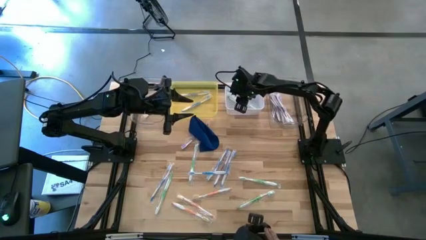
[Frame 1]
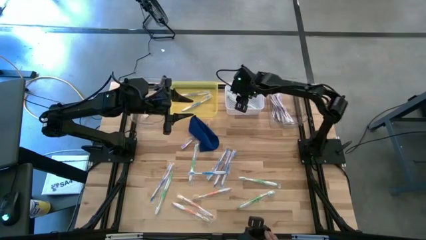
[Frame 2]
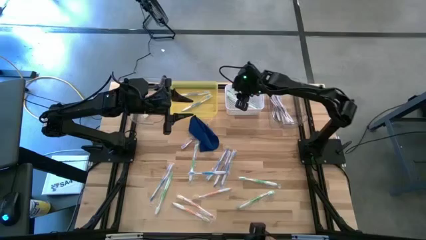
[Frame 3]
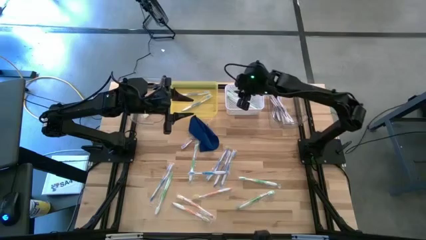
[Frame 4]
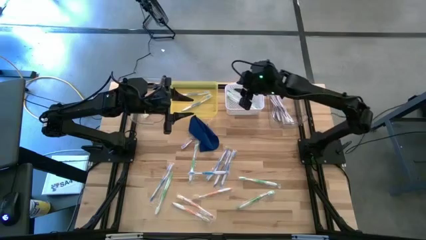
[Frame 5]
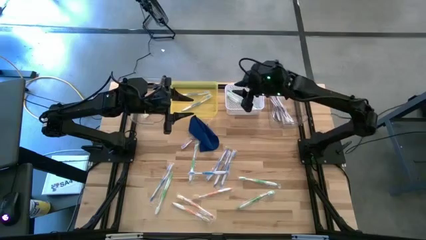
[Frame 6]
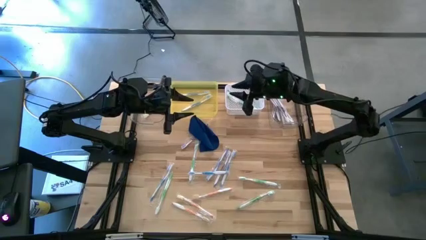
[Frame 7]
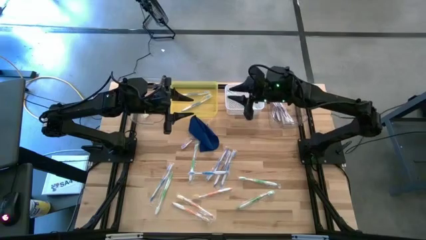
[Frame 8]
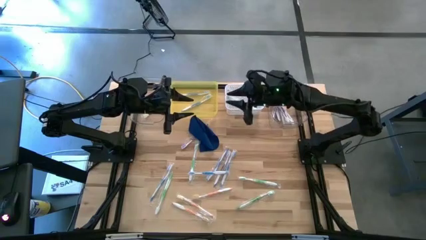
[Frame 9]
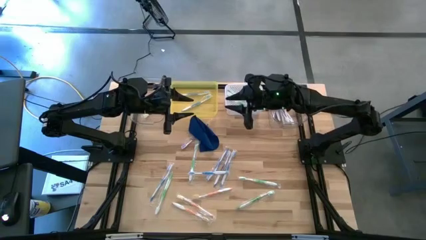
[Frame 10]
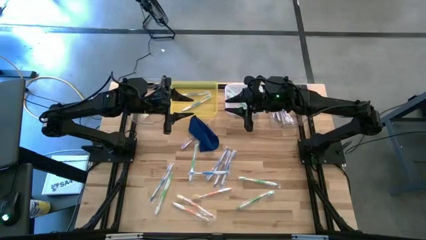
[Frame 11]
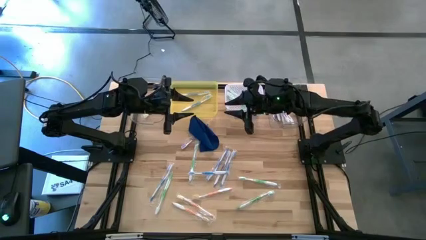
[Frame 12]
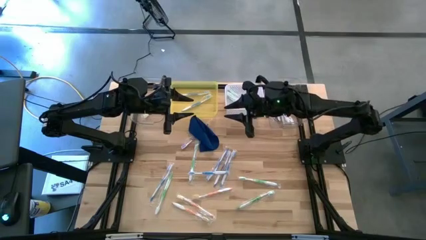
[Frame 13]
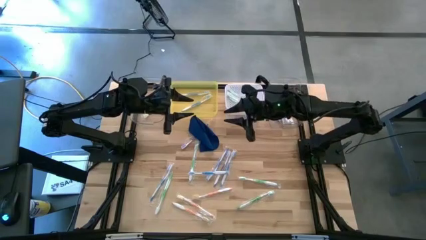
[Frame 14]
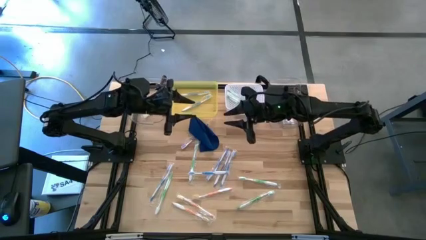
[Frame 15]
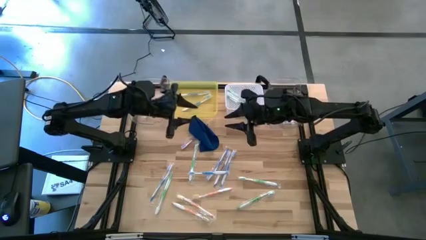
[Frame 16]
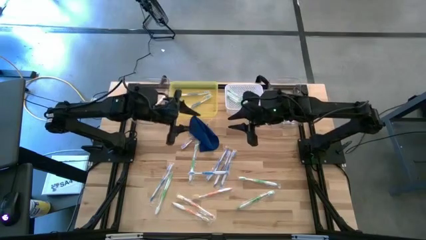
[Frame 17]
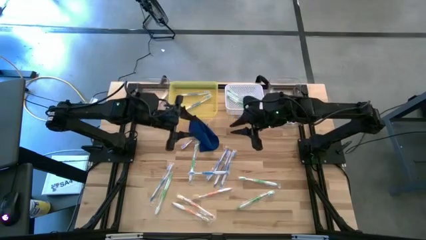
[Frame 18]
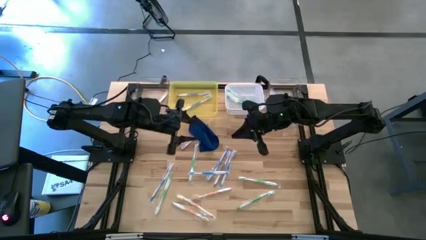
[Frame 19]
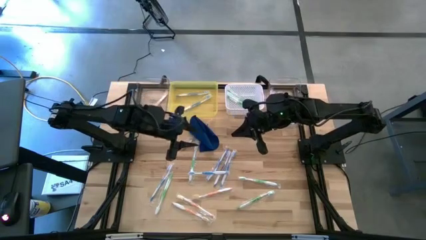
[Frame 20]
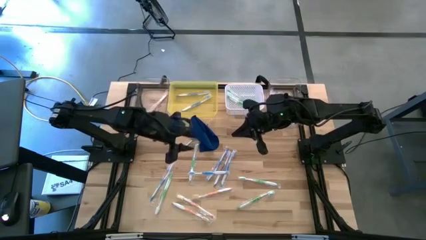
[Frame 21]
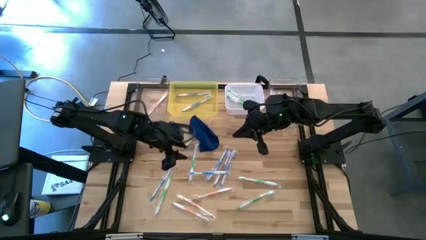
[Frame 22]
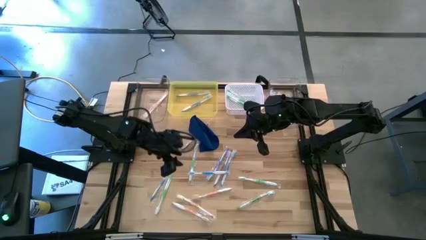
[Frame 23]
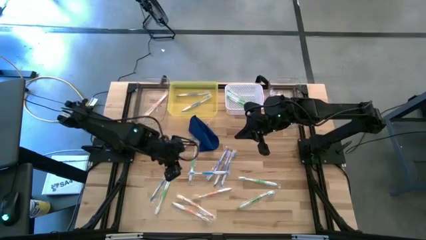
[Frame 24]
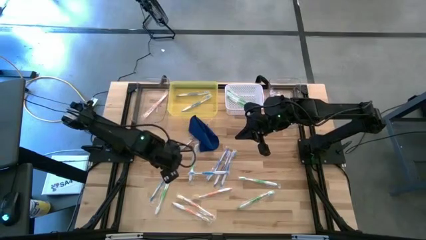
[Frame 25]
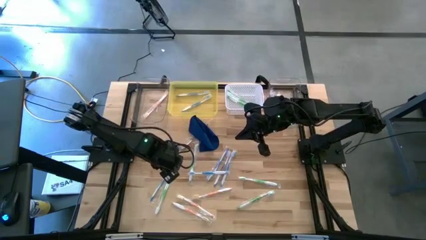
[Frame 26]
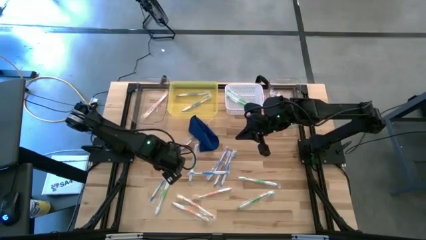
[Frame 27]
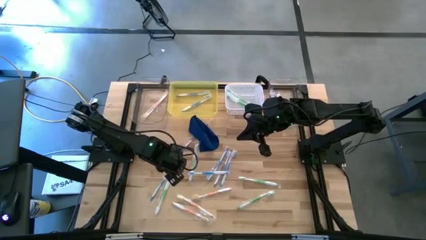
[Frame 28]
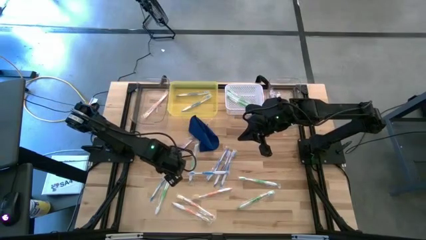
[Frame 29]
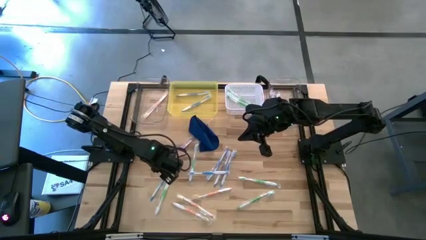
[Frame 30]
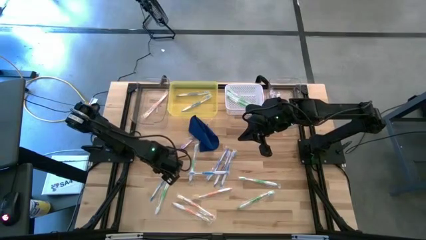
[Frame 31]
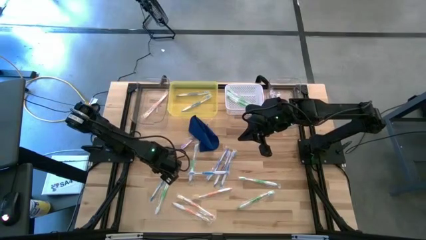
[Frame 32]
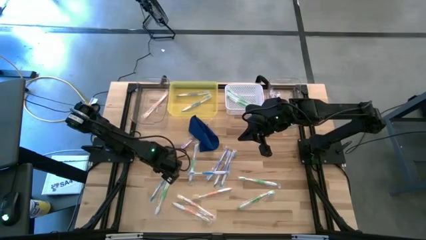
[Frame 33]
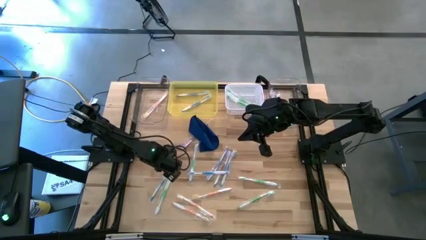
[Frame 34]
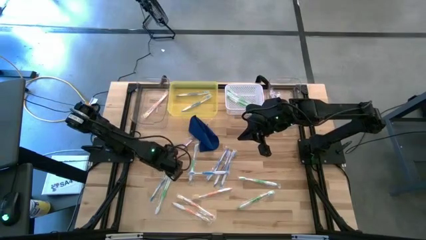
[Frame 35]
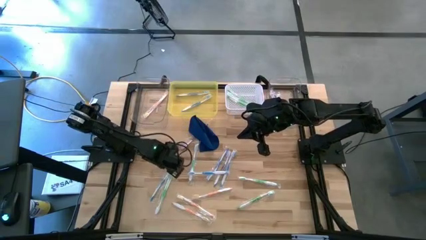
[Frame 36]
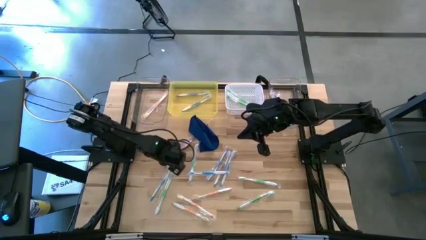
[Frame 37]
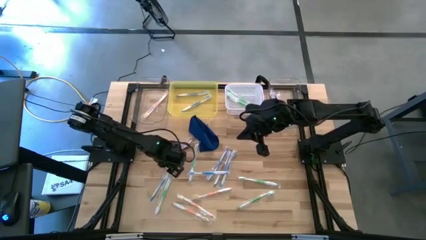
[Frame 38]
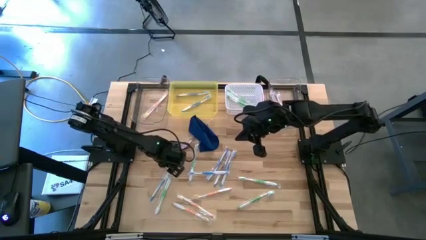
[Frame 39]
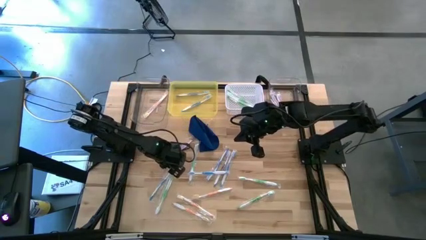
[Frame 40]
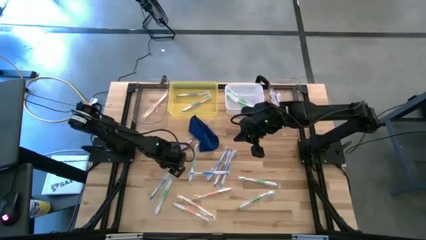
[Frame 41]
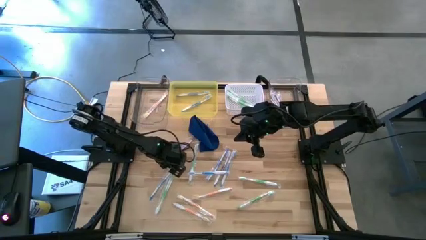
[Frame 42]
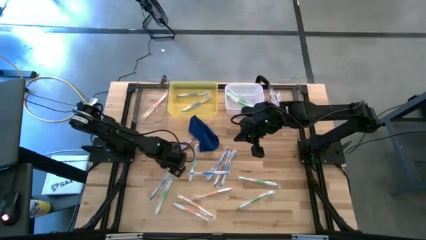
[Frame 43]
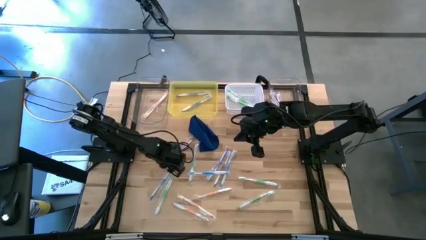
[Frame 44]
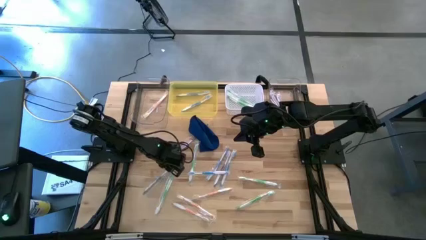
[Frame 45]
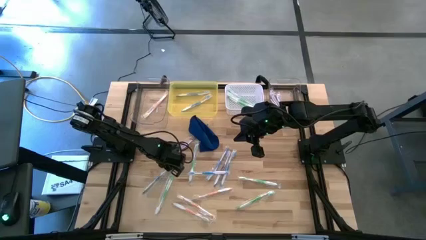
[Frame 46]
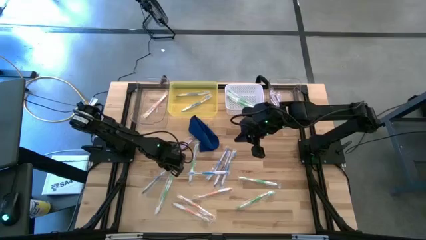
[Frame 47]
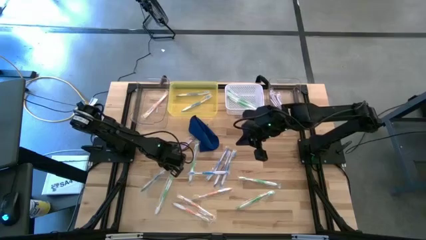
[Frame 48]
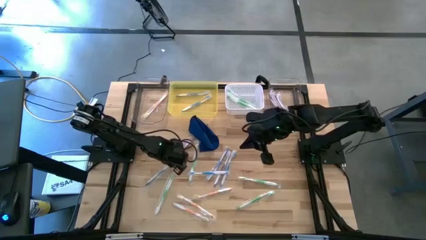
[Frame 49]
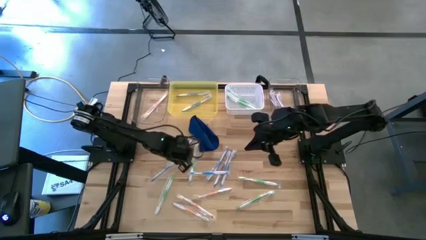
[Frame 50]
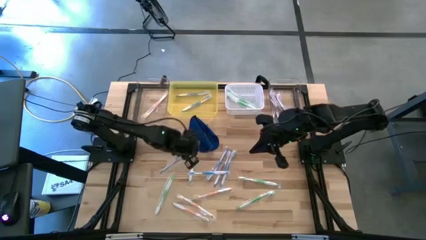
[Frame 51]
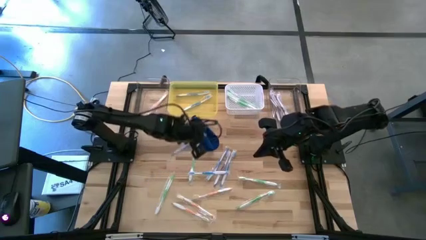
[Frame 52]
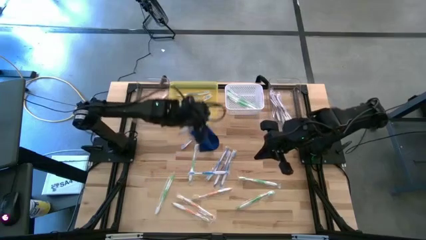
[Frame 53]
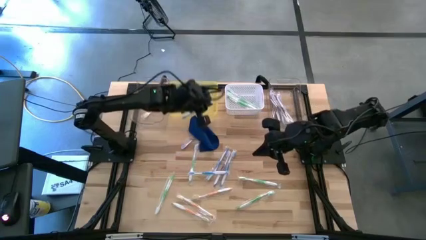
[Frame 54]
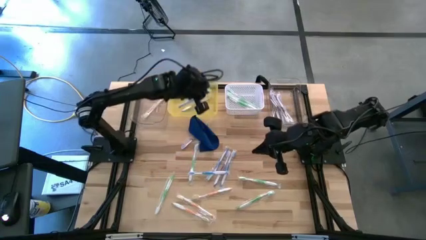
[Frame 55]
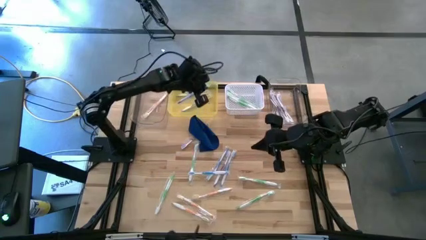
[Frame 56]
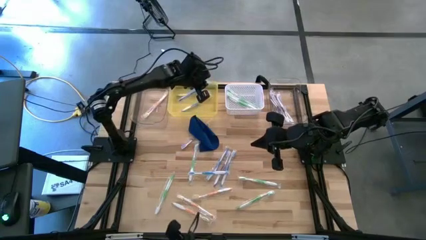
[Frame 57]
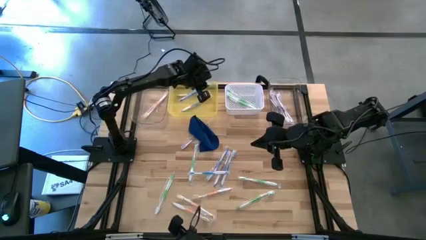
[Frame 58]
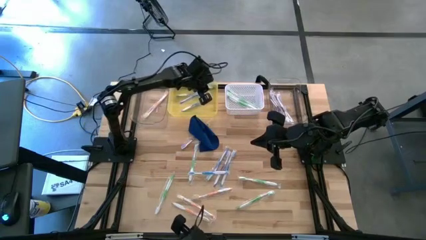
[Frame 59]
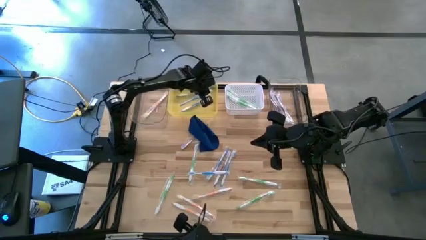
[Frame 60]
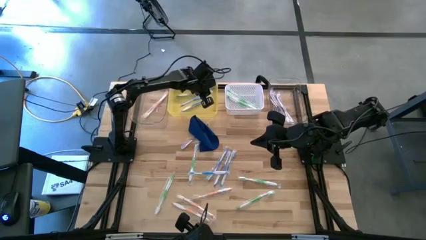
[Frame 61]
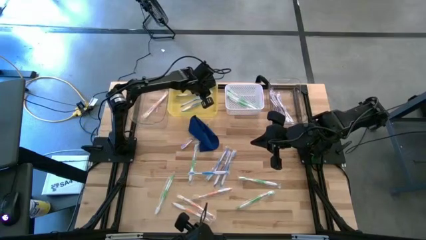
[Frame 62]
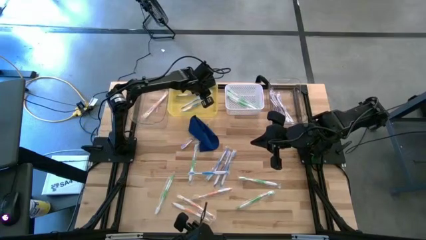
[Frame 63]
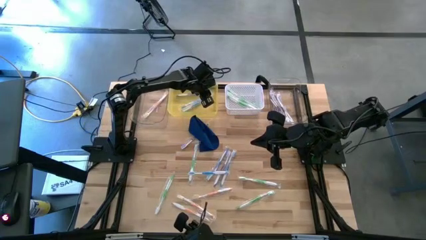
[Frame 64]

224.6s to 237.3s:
Task: Pick & Place Toothbrushes
Put the blue toothbrush into the yellow bin

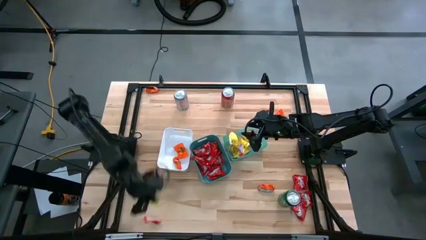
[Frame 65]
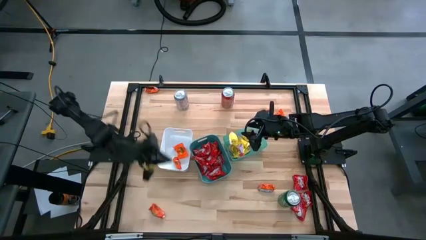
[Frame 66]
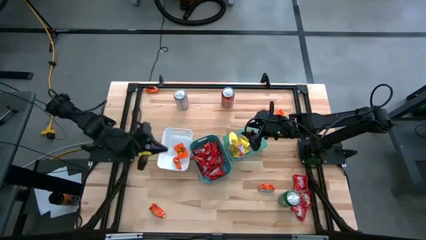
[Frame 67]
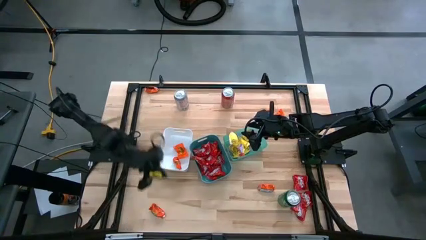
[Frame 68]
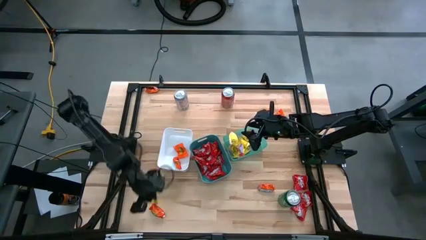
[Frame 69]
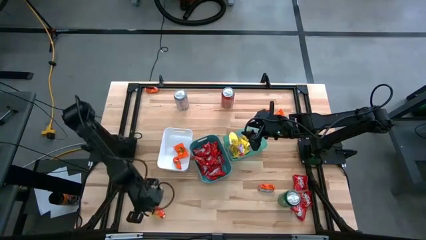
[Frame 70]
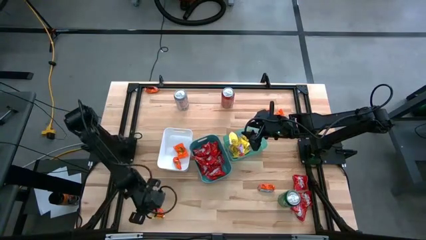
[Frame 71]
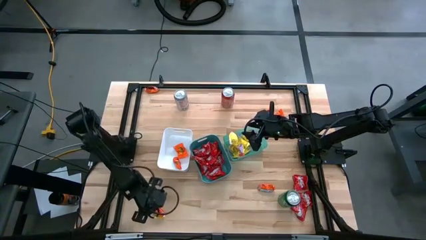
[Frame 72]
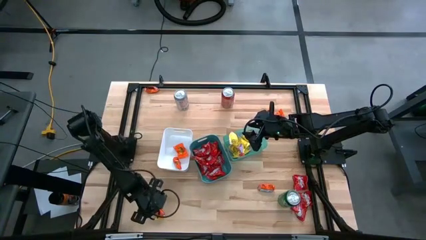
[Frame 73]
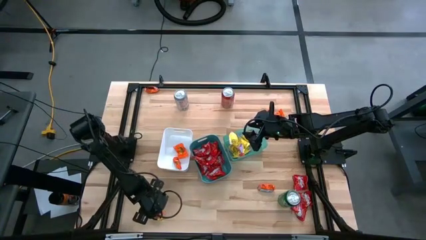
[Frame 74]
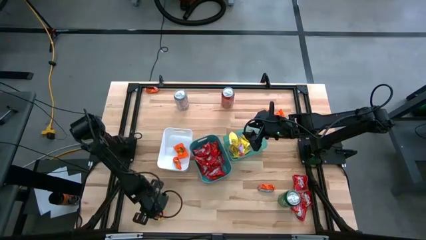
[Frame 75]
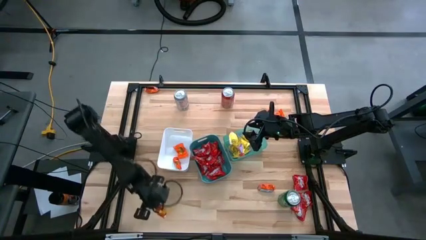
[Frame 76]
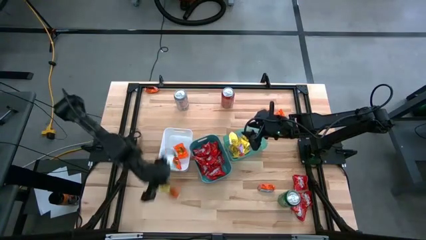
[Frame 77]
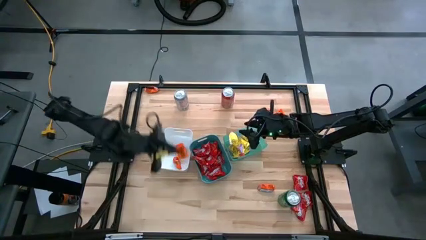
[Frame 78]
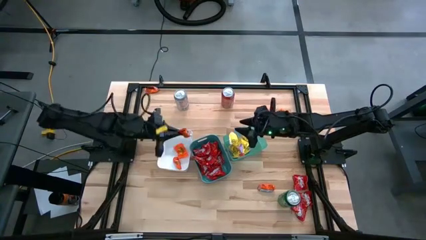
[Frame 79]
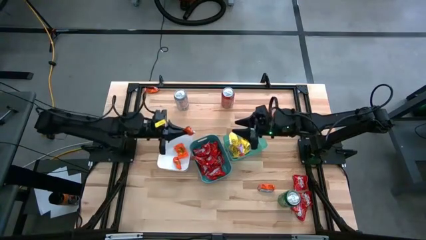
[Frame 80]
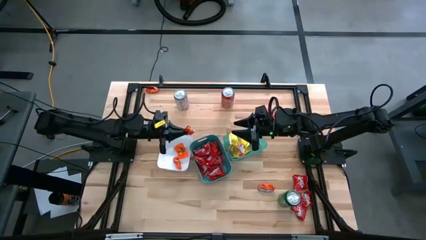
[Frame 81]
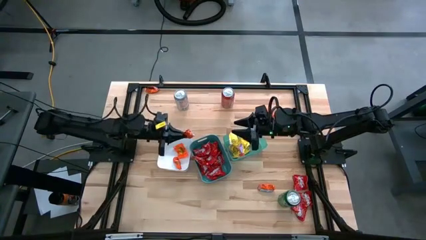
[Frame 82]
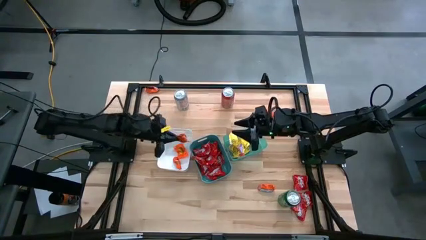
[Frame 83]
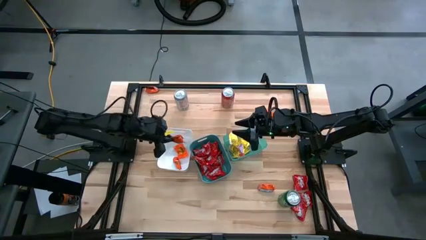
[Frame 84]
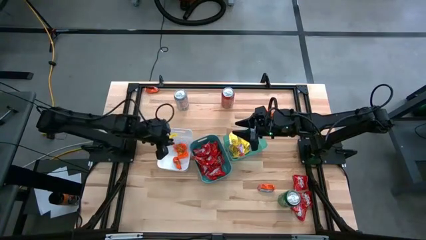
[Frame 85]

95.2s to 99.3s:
Task: Sort candy
Put the orange chocolate into the white bin
